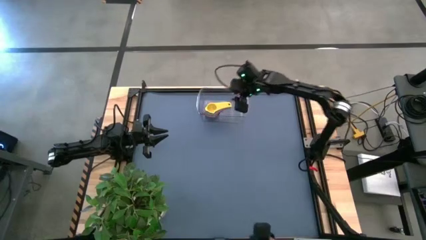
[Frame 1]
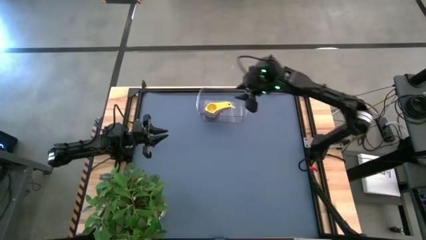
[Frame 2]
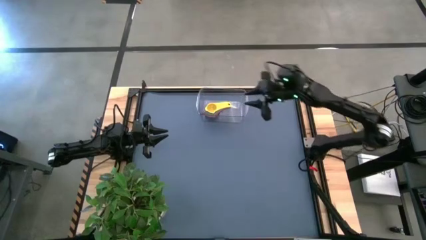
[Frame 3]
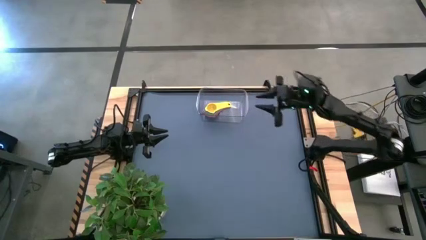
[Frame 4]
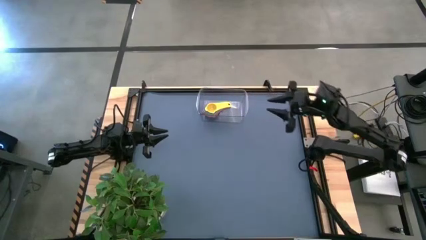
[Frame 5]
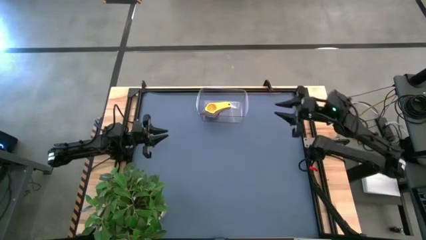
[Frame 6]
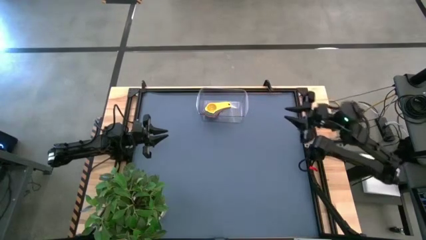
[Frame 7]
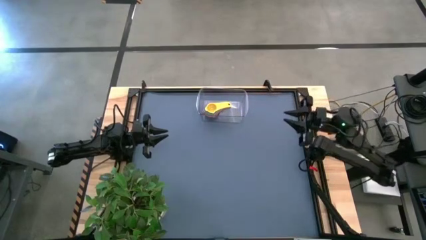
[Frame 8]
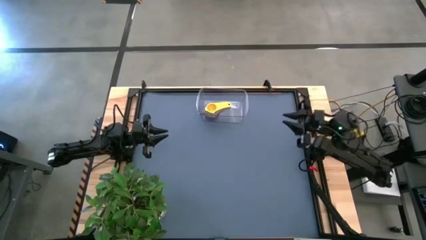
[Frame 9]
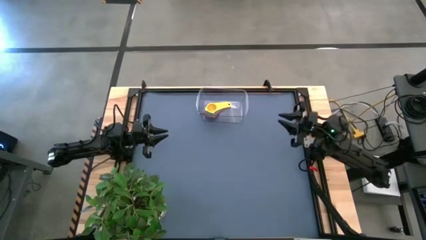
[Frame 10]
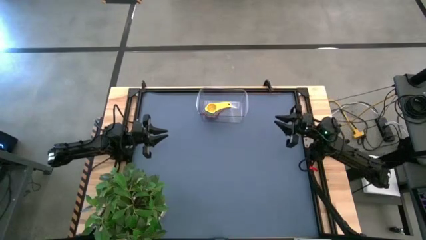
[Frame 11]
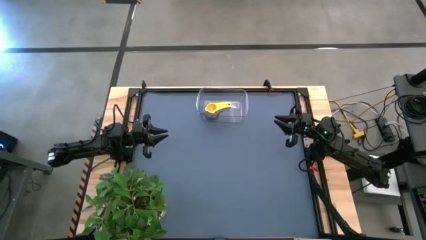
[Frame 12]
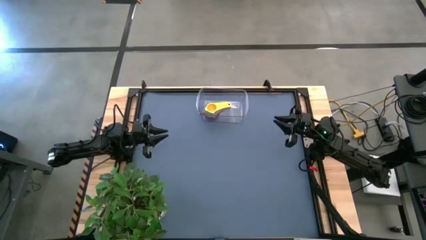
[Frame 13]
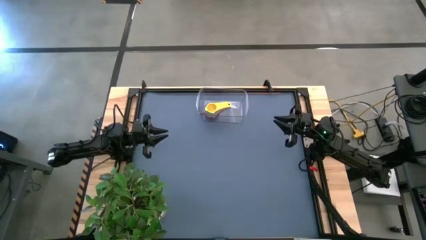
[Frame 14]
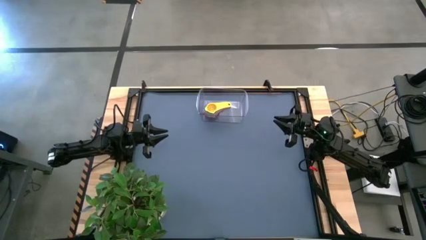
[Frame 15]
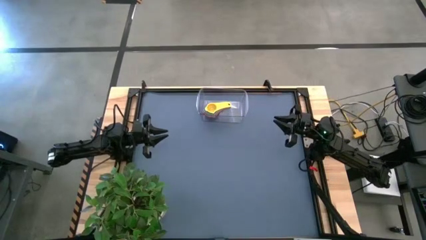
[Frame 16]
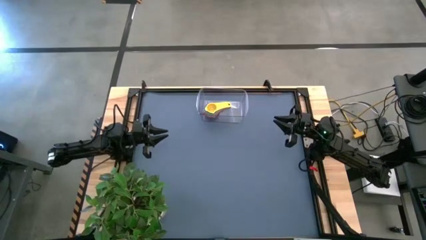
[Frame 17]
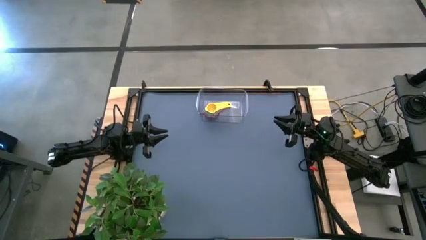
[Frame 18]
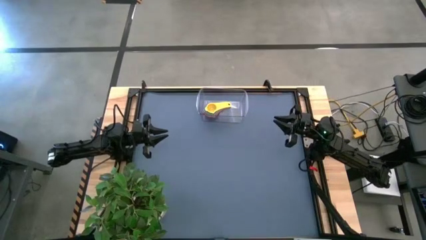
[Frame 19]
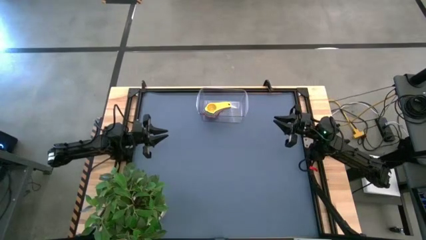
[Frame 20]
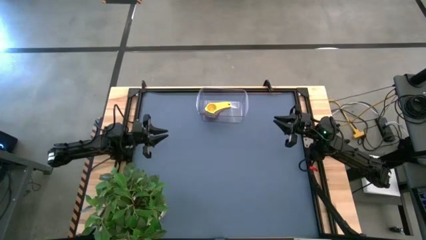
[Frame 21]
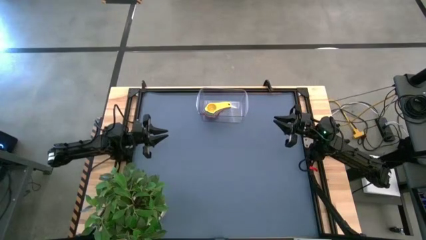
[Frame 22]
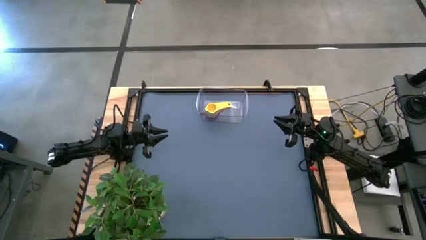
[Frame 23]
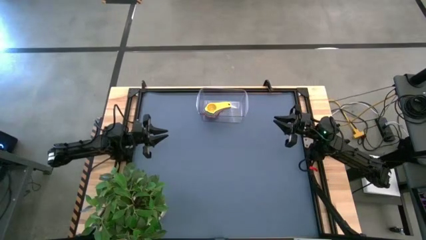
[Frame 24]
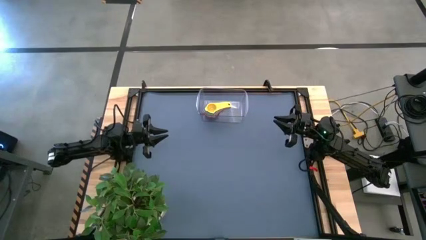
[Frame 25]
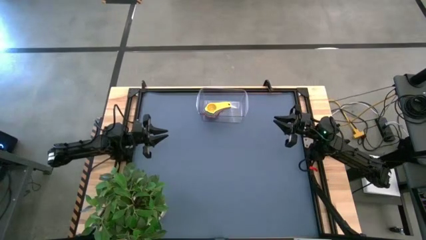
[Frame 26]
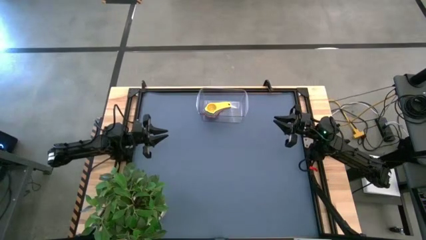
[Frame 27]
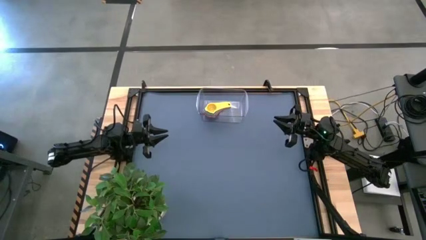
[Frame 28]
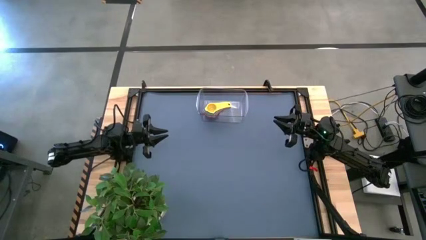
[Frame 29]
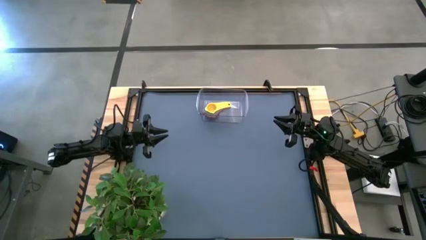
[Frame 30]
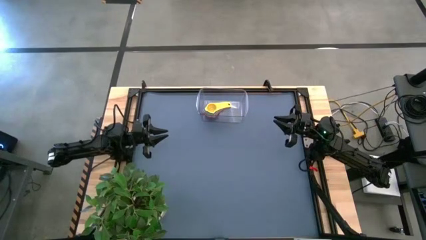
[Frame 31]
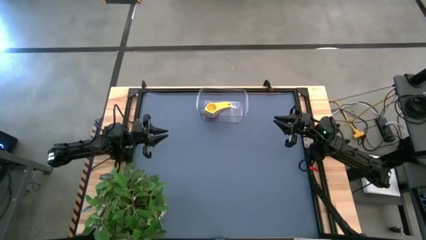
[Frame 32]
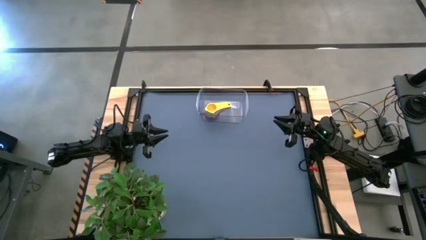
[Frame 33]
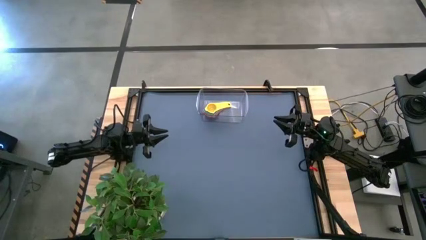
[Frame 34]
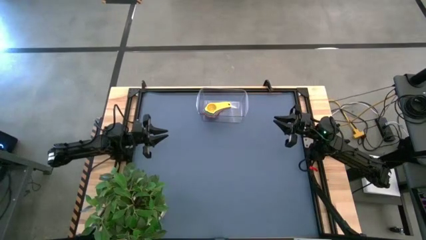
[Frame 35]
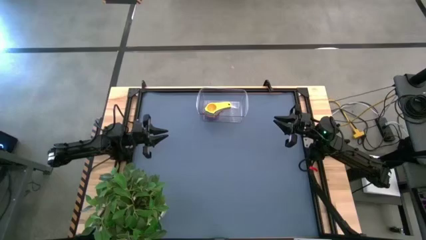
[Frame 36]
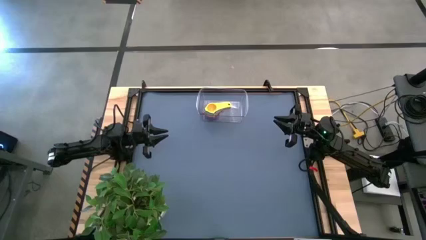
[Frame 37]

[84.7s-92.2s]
Task: Nest measuring cups in basket
Return to Home Position

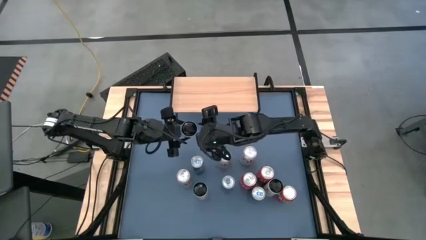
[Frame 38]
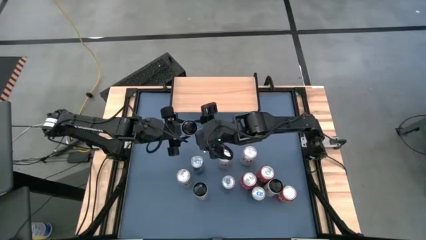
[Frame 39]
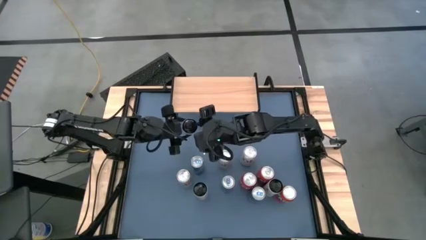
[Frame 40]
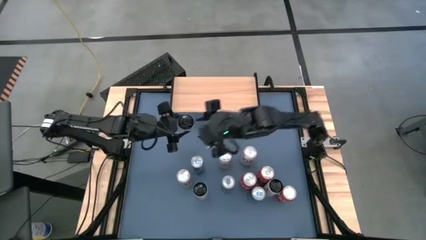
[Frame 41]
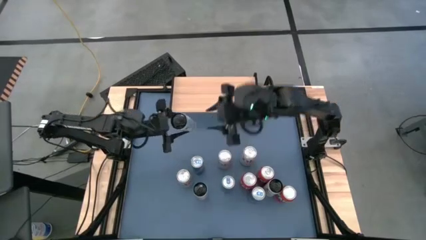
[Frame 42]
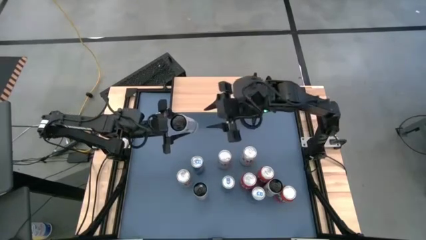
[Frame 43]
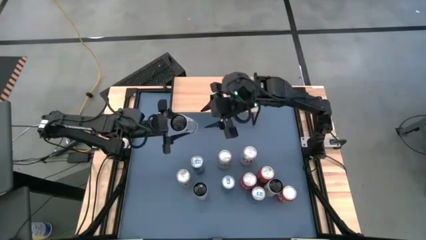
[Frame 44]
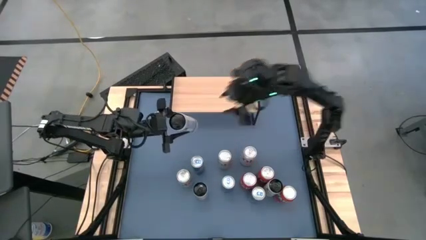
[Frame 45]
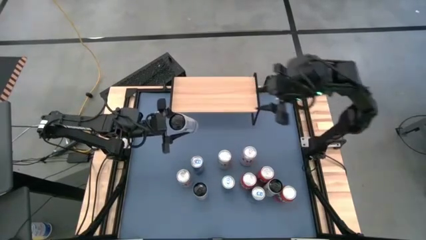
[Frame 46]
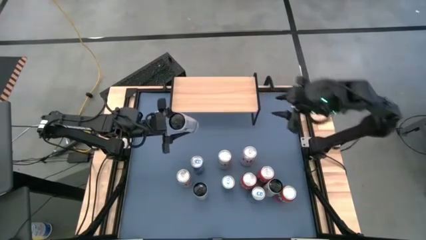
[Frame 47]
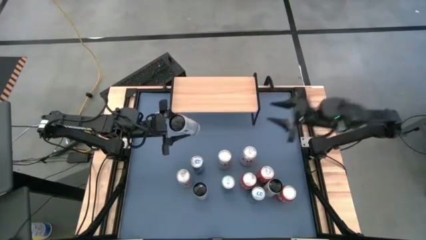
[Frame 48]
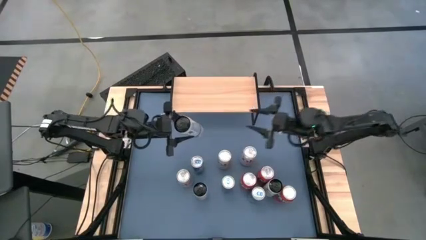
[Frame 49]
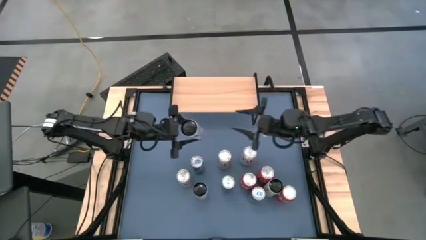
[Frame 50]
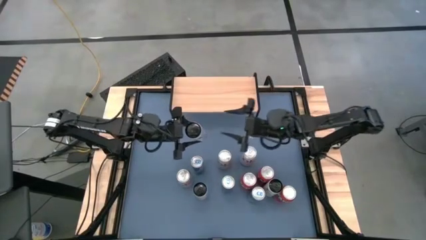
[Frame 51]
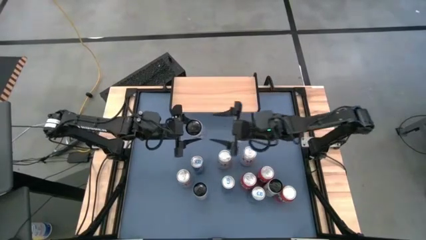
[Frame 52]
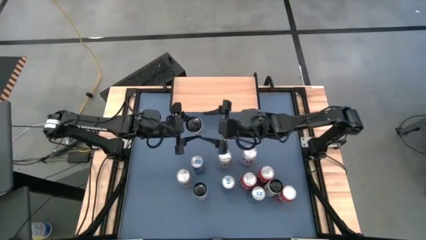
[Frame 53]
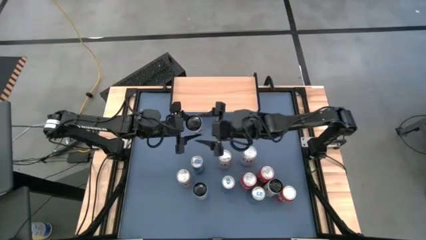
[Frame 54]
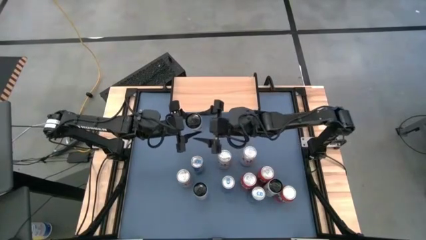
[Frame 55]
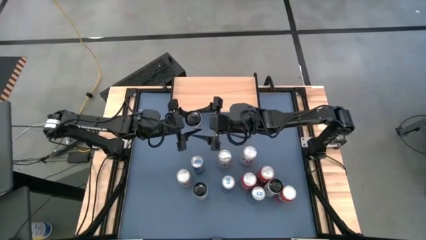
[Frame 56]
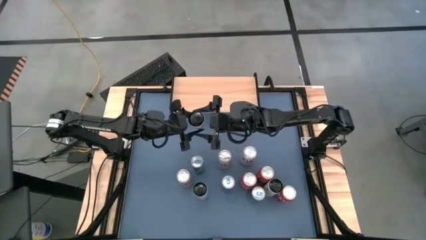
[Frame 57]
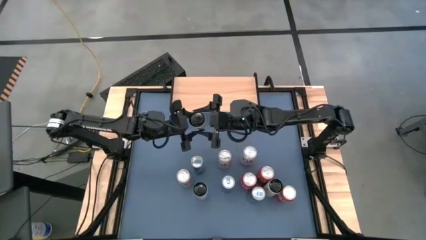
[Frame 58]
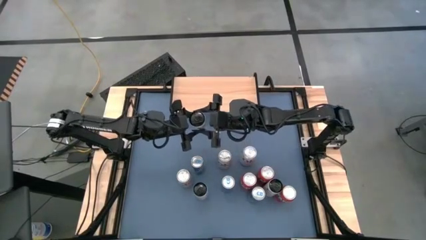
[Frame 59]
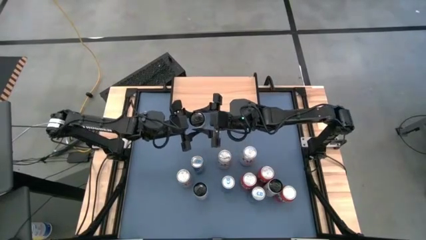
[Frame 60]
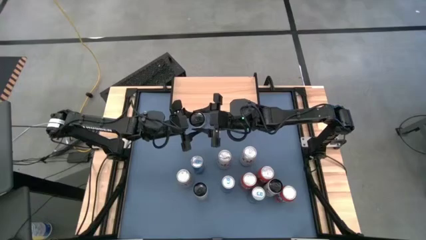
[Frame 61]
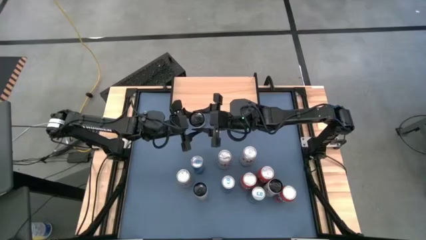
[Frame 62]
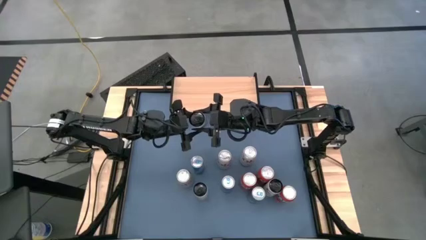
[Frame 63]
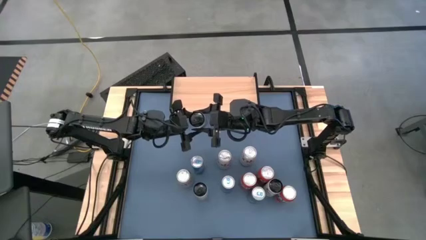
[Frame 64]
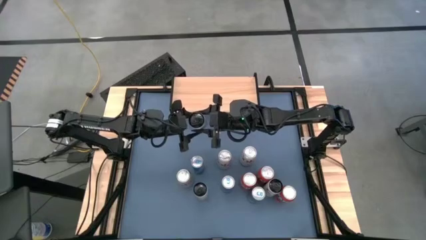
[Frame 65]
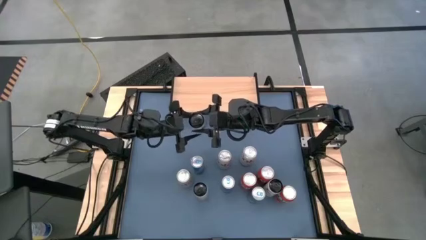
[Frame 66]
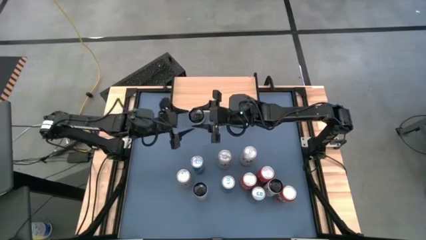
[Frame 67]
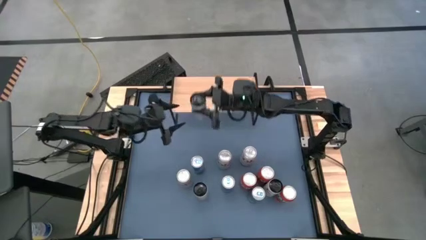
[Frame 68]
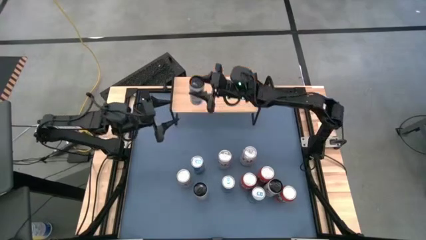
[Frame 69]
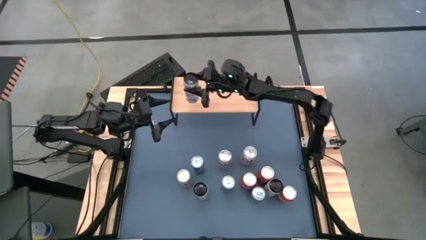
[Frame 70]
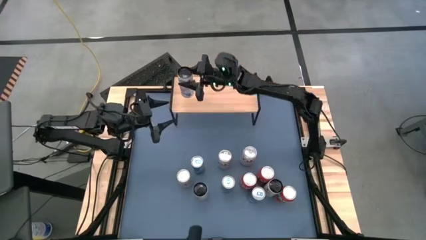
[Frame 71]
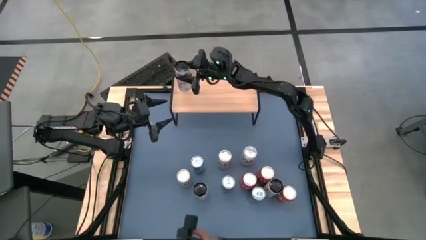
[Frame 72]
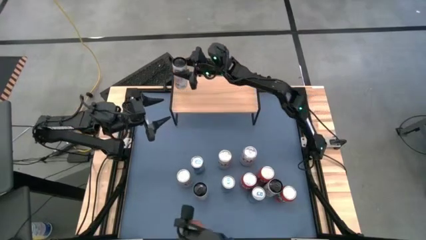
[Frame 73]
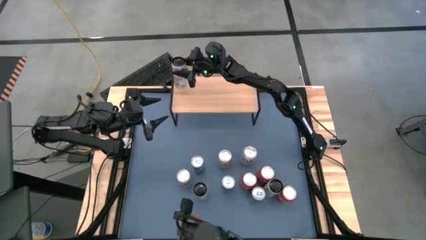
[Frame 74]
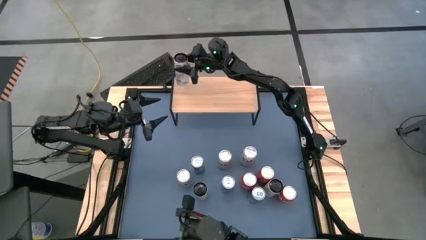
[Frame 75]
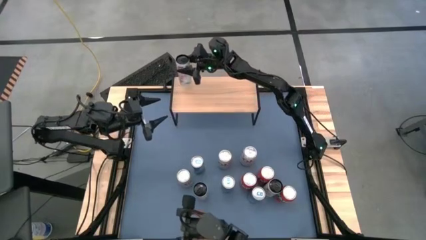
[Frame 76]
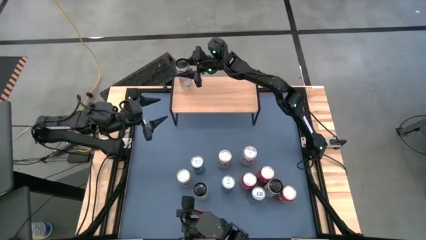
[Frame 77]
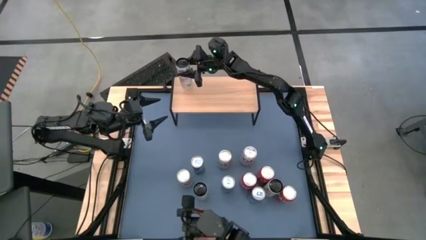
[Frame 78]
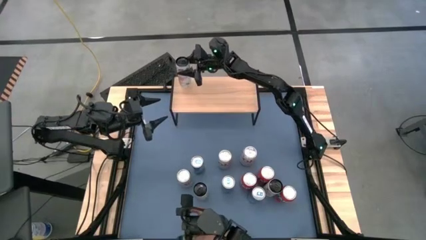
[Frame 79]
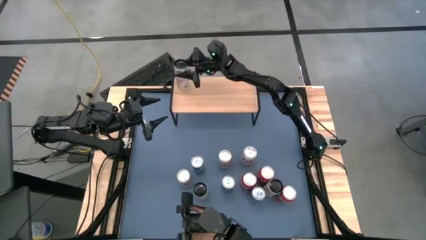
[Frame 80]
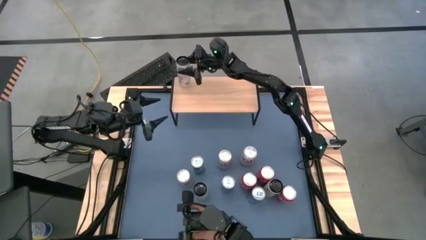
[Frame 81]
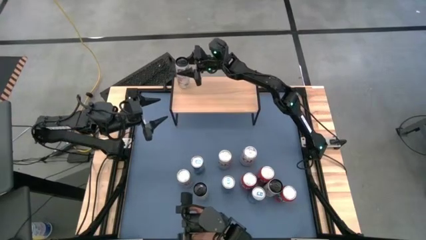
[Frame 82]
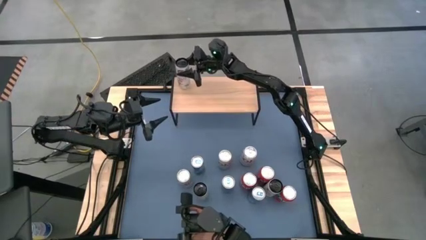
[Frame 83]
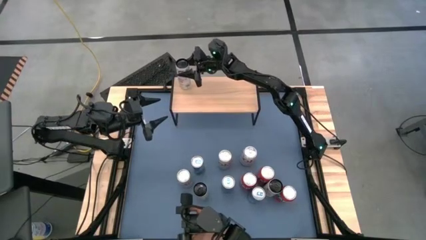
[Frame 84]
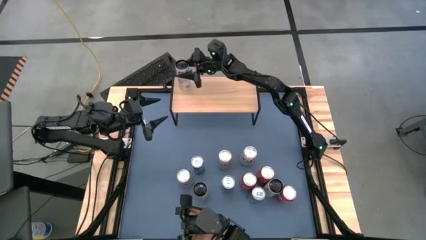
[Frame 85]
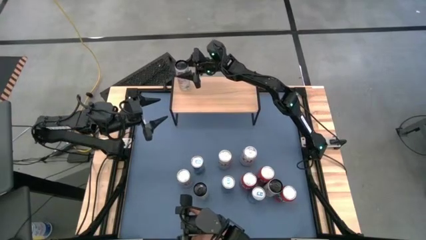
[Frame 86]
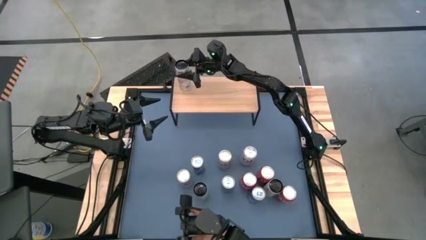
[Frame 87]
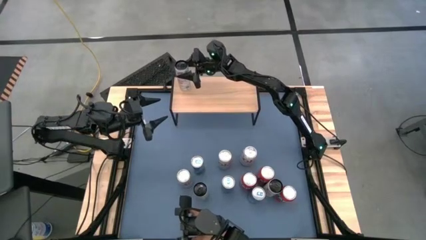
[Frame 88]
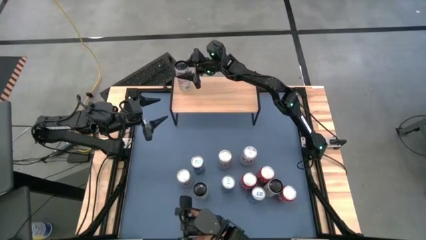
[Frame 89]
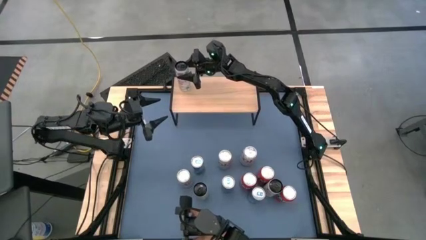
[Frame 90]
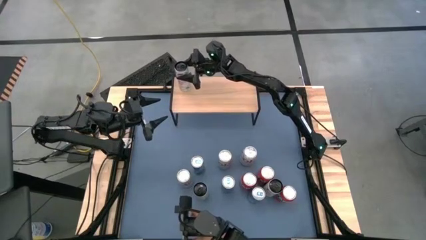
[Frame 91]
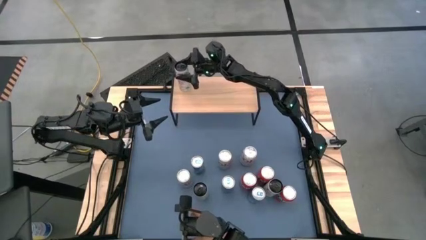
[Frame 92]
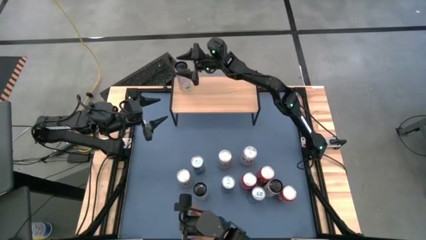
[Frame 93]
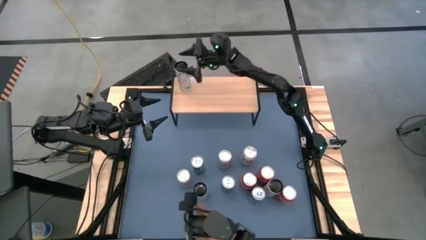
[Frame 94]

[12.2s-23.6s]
Task: Place canned beverage on shelf
Put the bottom left black soda on the shelf
